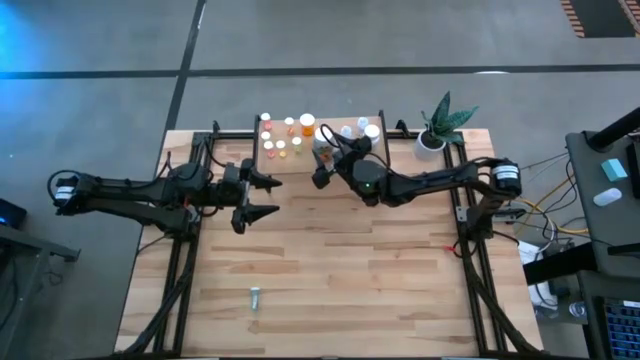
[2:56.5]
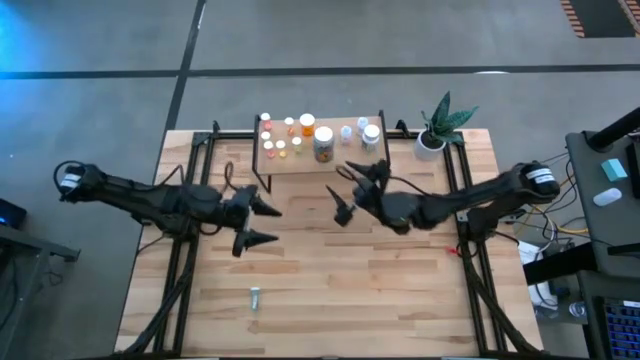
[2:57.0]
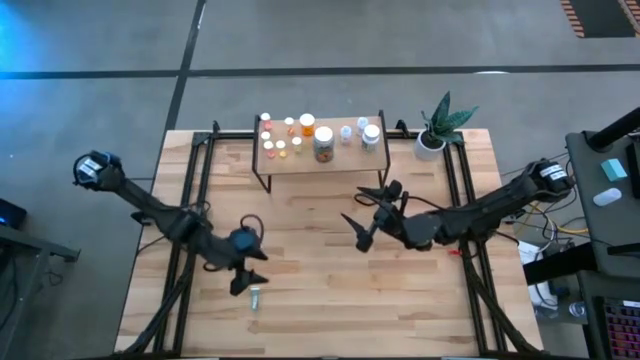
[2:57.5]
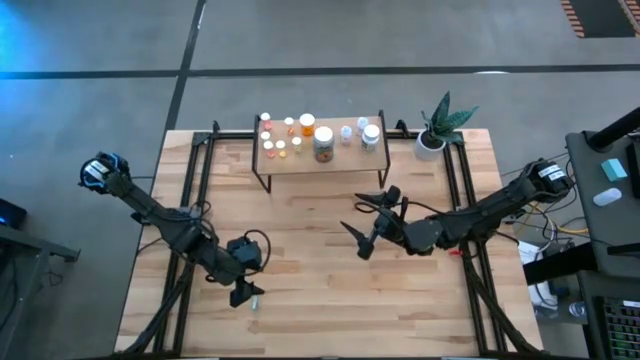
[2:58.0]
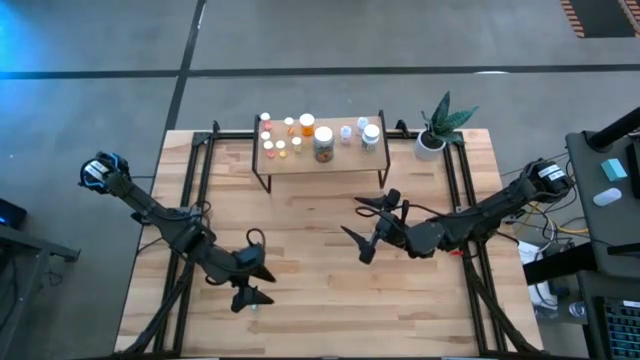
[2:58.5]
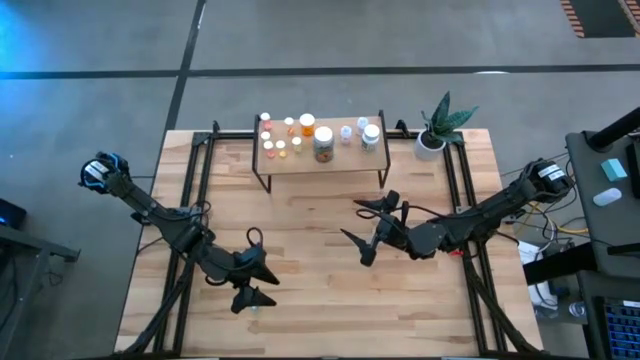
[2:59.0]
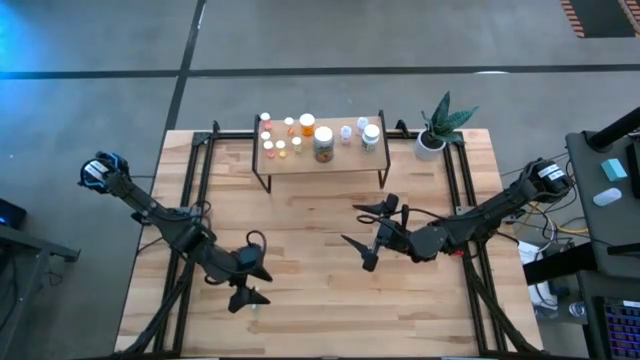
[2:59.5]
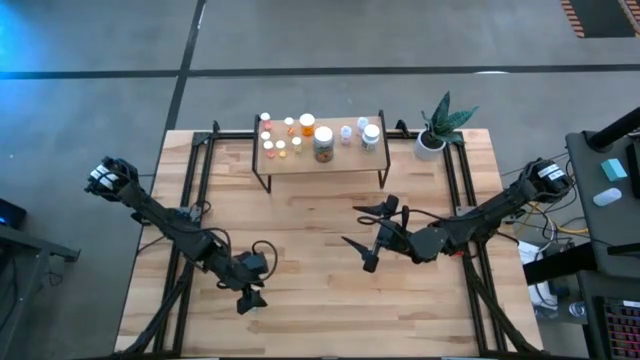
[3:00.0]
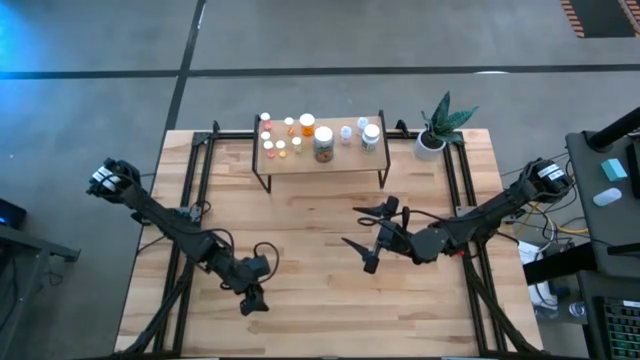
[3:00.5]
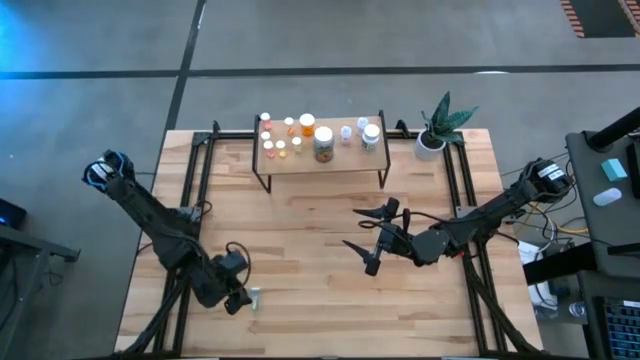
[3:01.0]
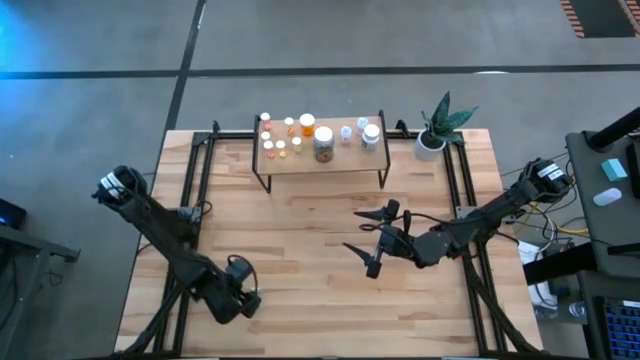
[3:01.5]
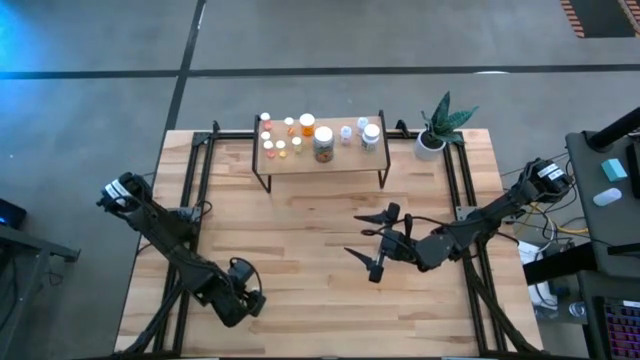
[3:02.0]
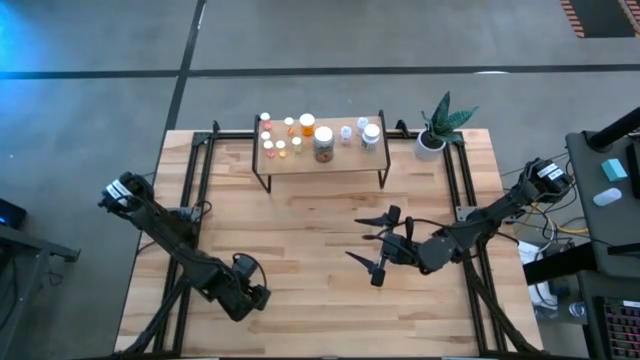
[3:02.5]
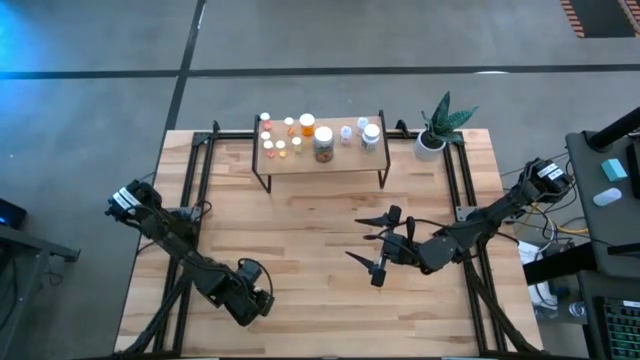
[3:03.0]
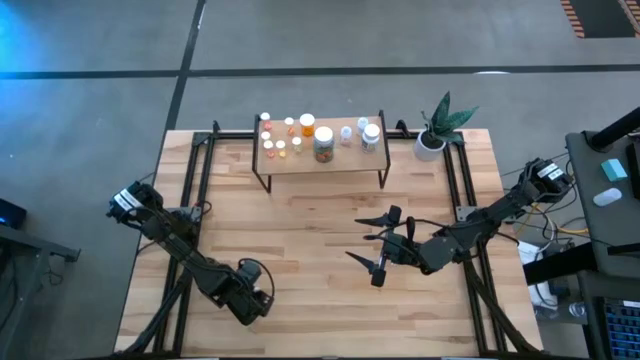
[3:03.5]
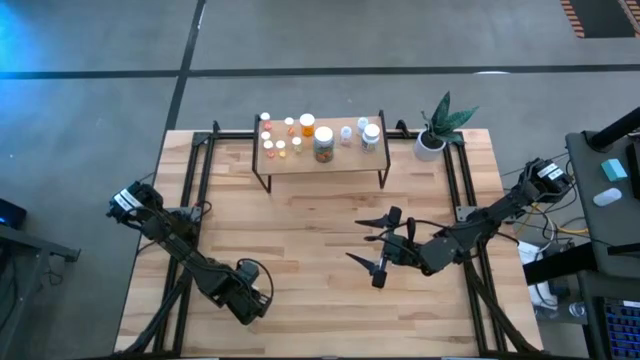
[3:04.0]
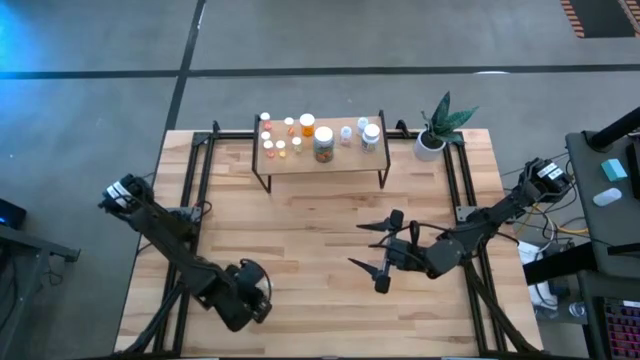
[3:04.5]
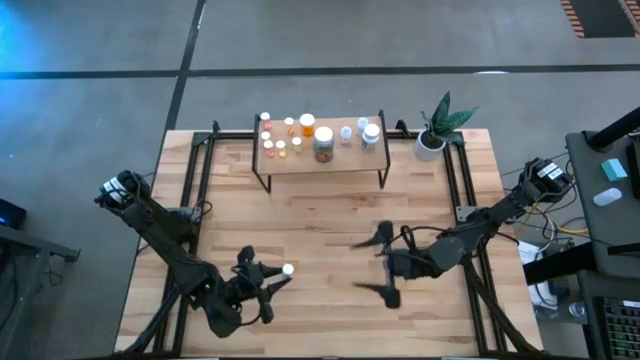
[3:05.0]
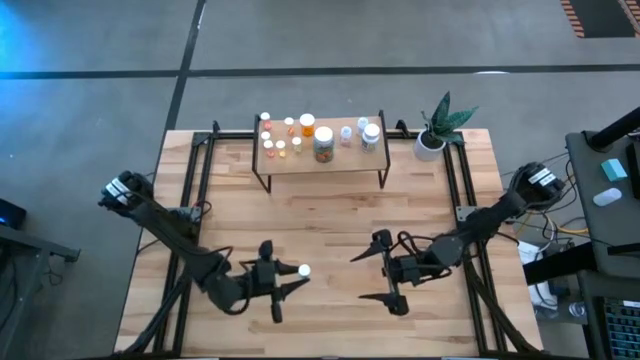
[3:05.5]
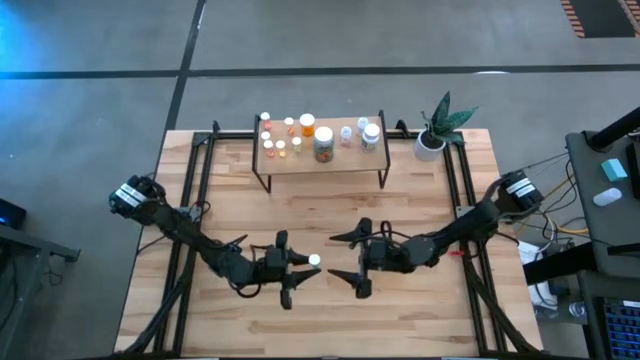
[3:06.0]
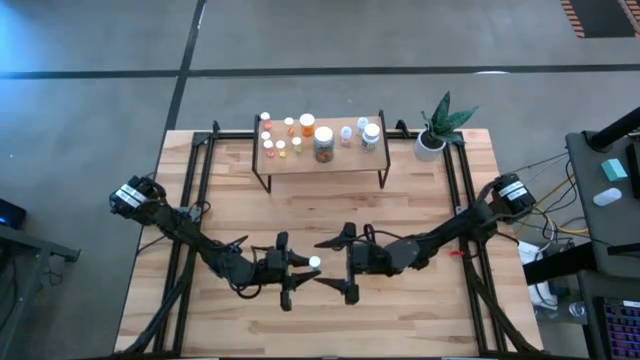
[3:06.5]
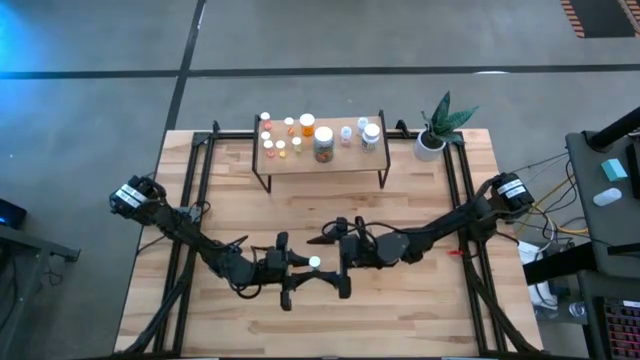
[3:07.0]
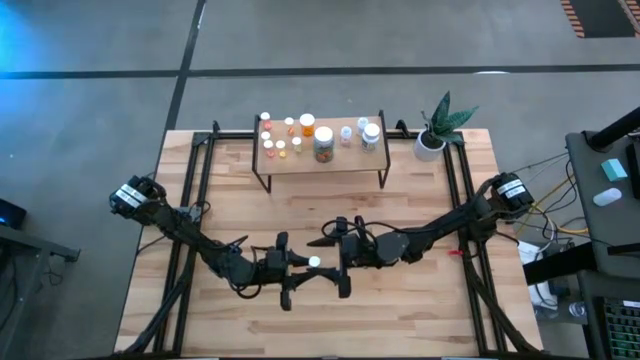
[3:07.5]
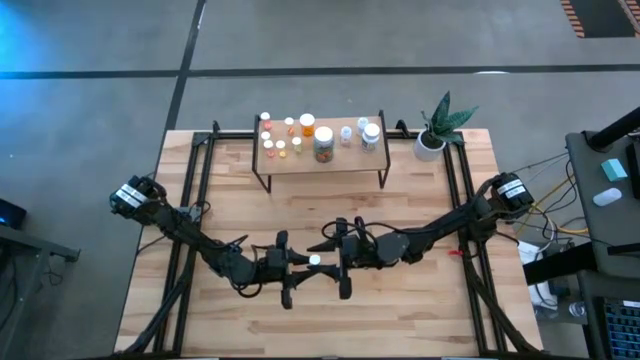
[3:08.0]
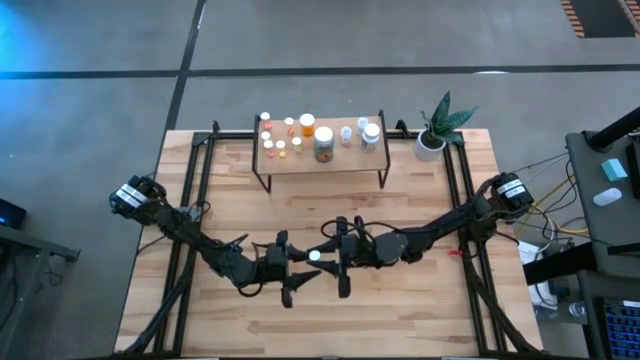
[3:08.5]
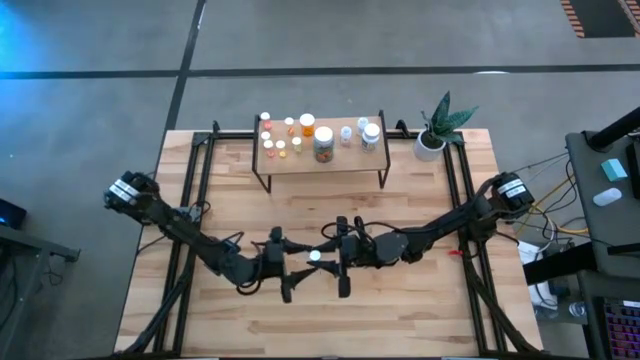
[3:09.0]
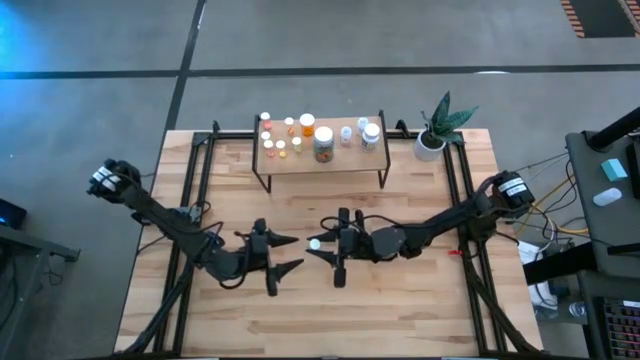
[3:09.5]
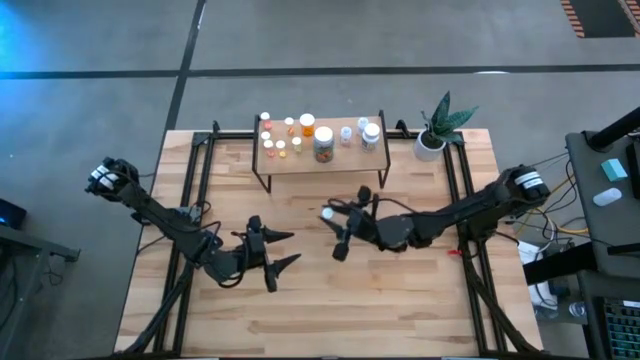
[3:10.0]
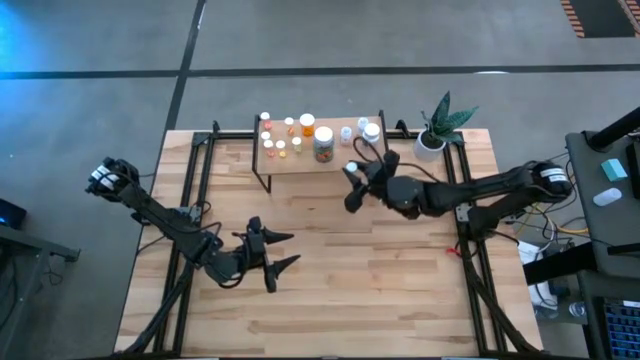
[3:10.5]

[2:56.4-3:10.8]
Task: Pick and place medicine bottles onto shelf by color
Put the blue pill bottle on the shelf
